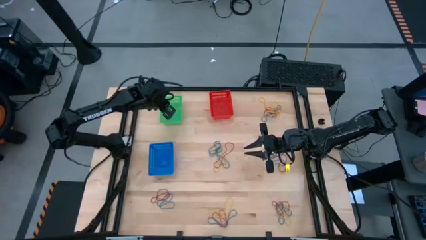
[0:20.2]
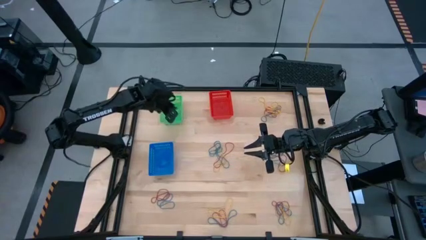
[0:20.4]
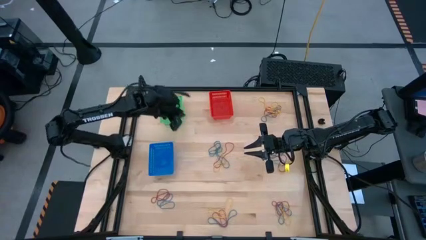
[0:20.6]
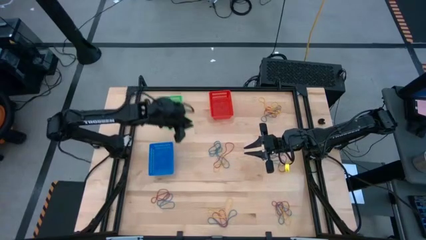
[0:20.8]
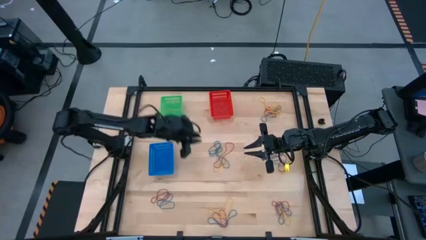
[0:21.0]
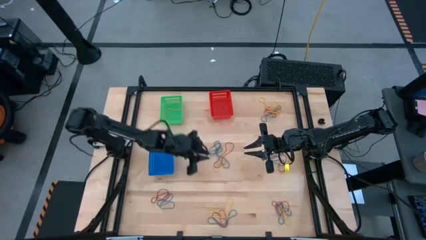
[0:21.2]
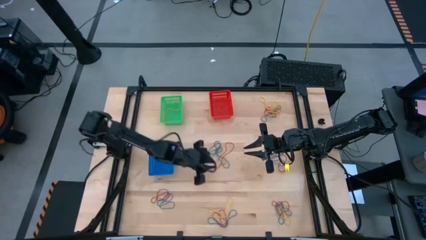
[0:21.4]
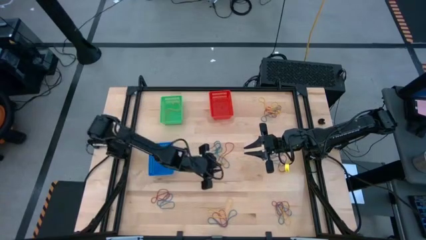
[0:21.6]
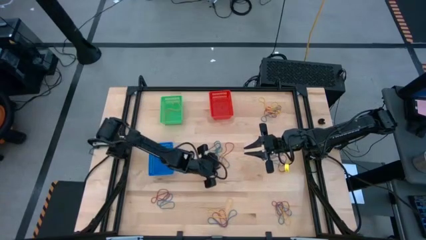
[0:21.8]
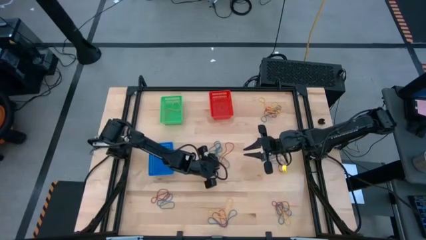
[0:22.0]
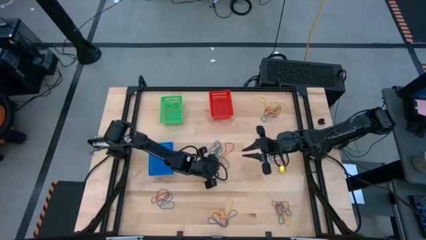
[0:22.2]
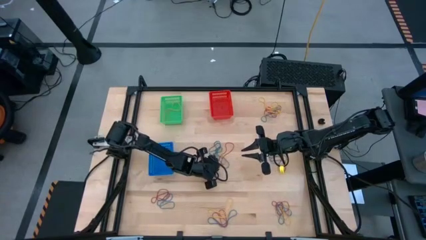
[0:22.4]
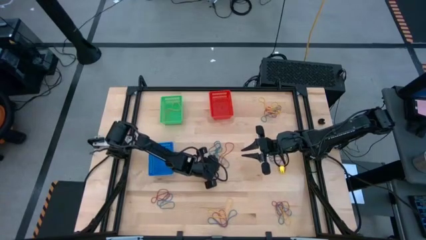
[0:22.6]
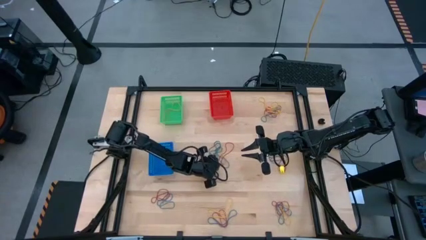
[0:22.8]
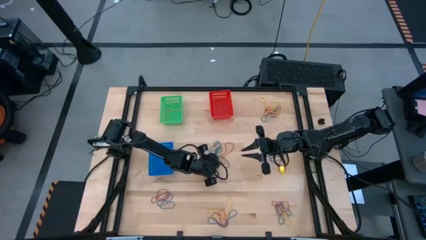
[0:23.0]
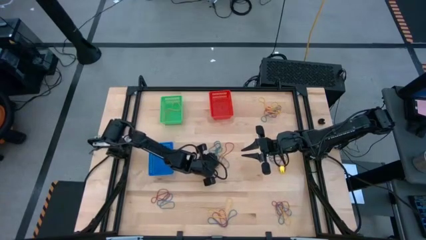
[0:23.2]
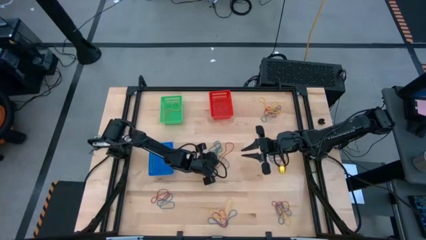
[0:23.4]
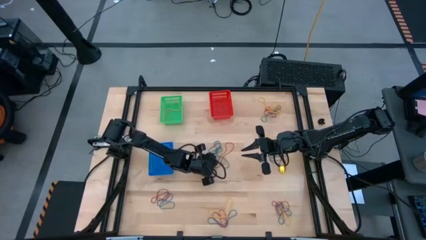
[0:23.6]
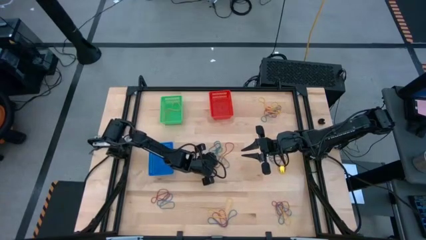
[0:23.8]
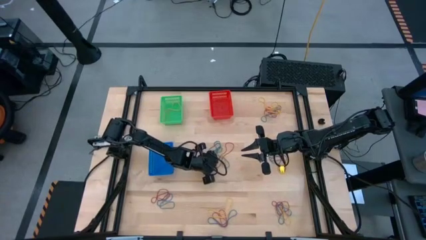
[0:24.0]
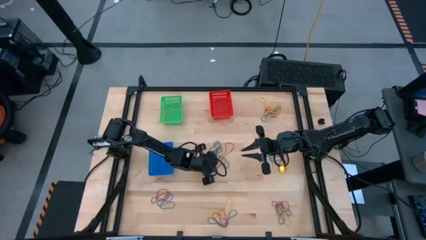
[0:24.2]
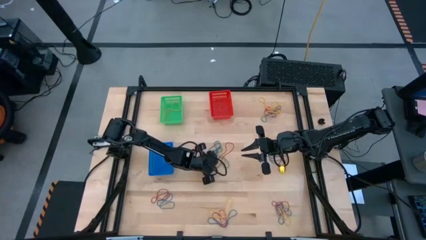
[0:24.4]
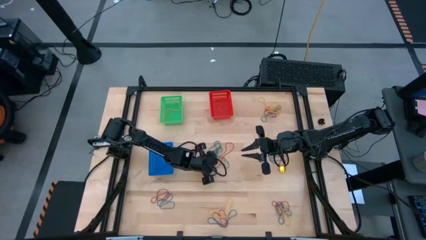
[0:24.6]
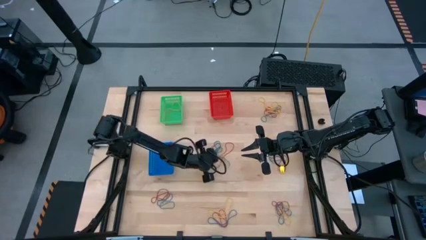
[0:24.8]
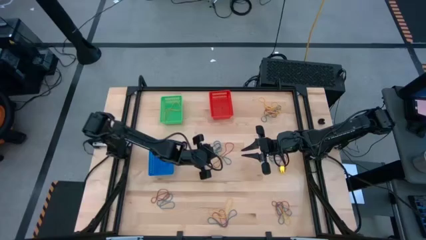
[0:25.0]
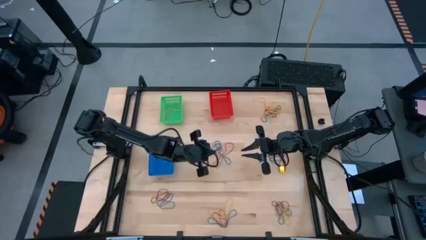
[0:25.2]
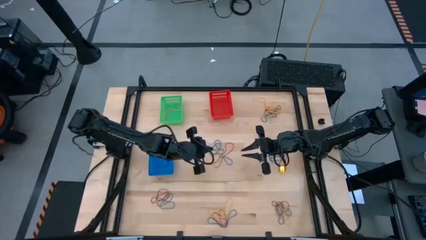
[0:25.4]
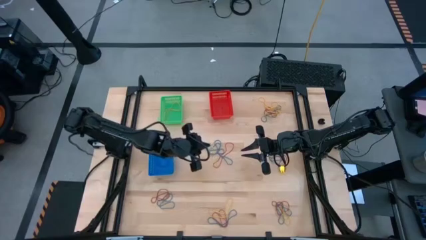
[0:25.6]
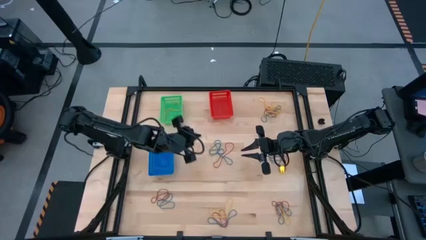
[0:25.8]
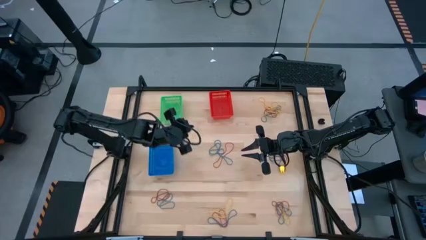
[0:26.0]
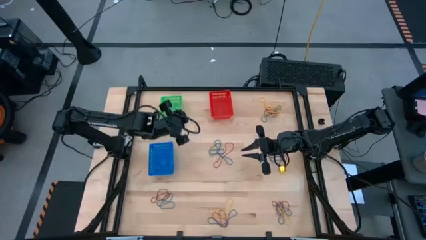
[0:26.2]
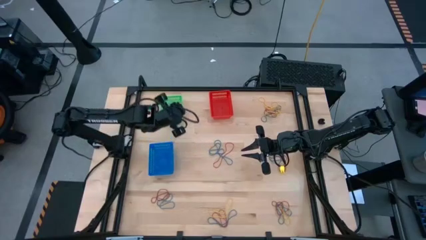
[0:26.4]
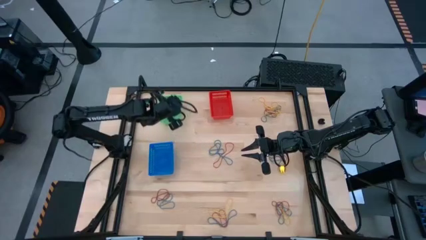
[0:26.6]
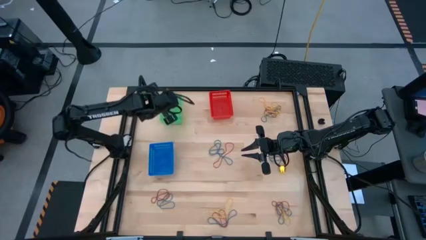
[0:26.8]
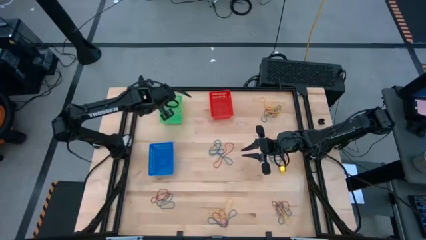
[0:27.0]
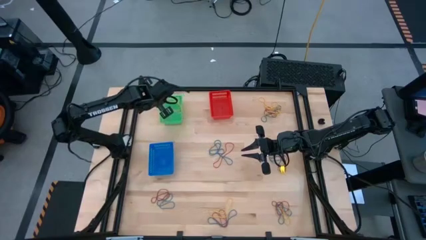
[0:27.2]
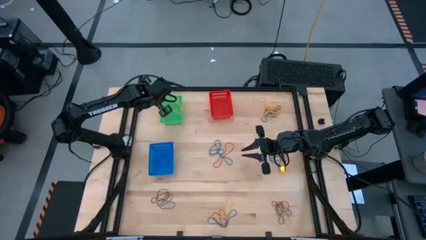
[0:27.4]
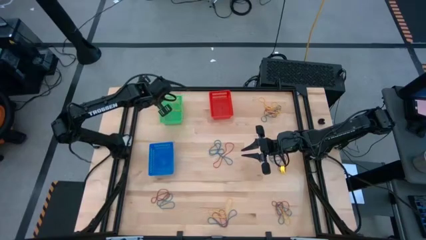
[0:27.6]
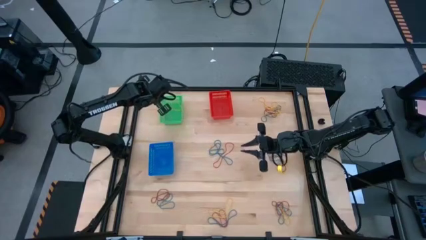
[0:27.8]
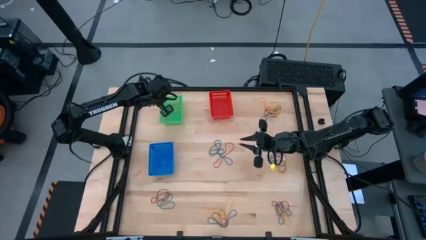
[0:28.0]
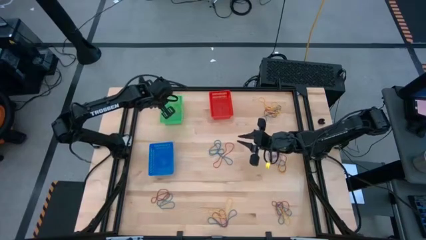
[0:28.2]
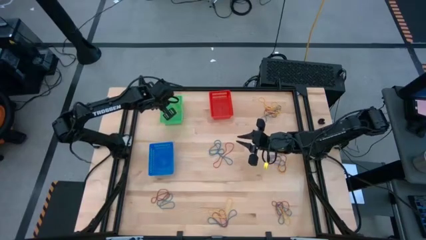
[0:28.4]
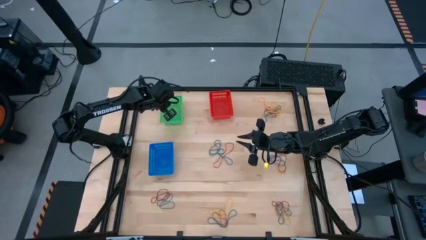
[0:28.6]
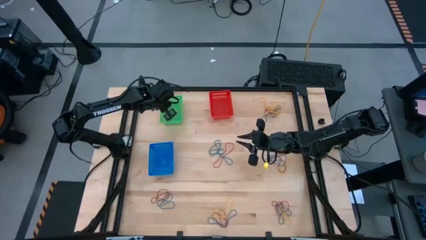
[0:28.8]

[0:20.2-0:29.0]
Task: Sort rubber bands into baskets
Put the yellow rubber band into the green bin

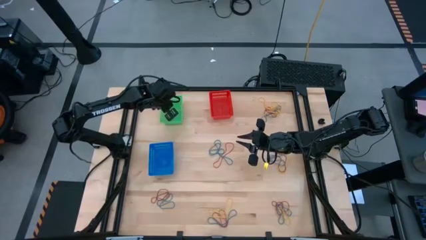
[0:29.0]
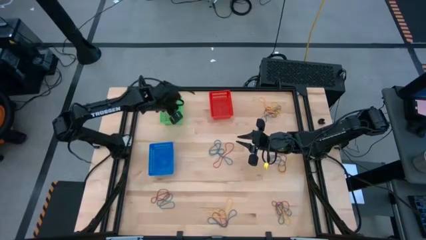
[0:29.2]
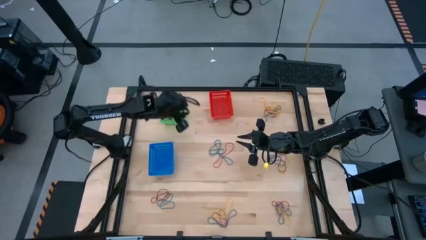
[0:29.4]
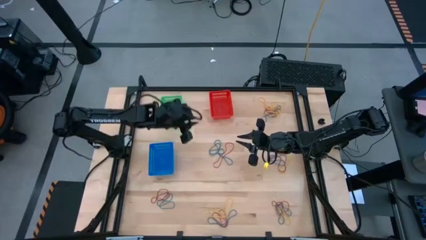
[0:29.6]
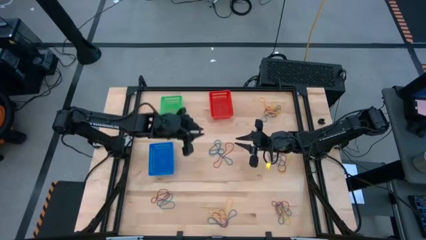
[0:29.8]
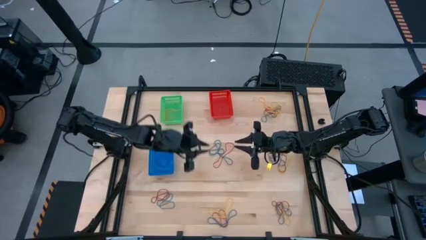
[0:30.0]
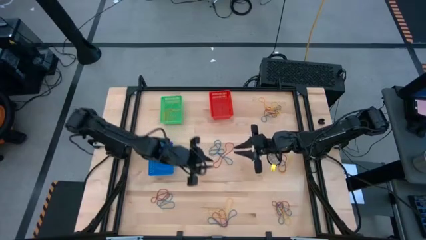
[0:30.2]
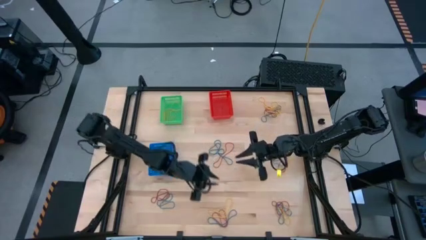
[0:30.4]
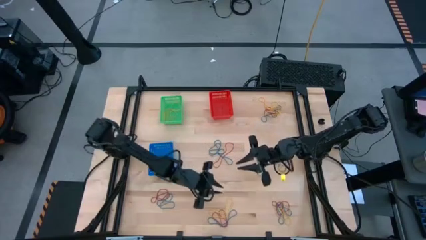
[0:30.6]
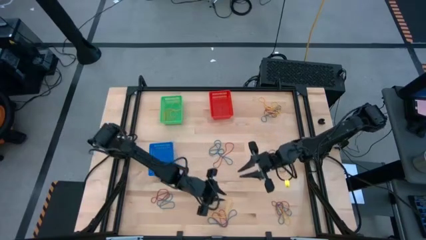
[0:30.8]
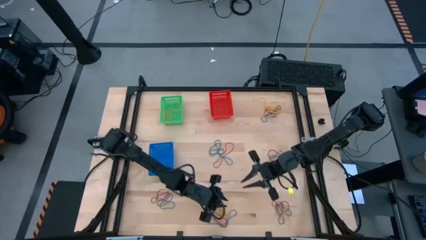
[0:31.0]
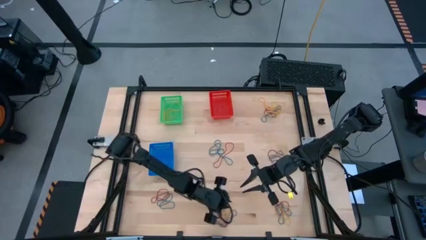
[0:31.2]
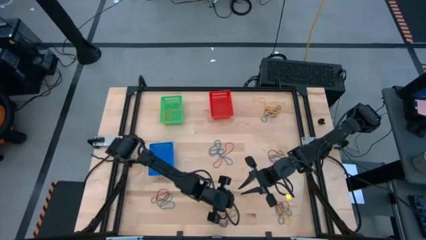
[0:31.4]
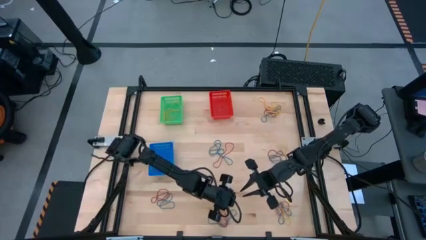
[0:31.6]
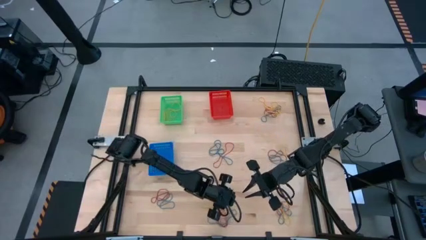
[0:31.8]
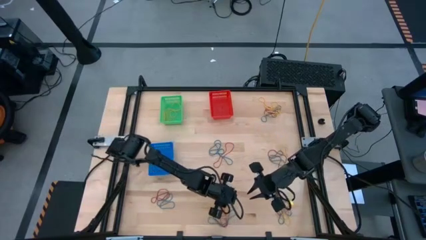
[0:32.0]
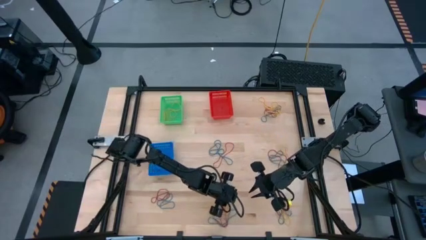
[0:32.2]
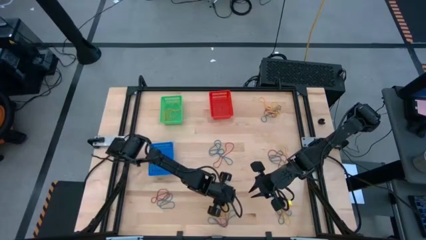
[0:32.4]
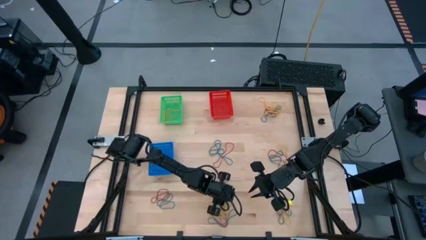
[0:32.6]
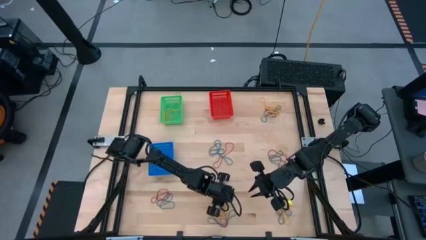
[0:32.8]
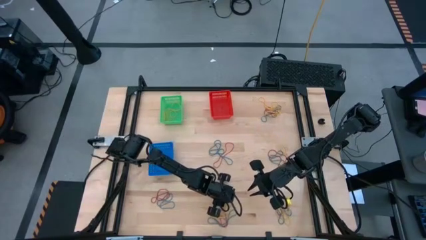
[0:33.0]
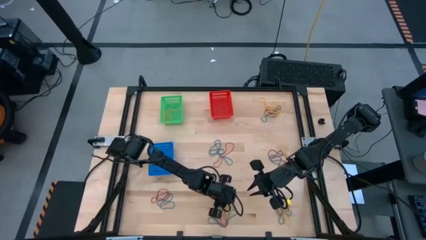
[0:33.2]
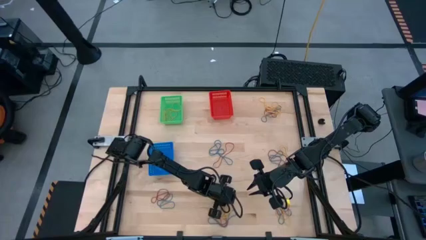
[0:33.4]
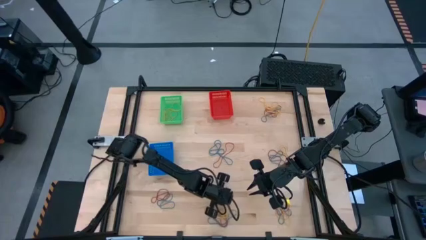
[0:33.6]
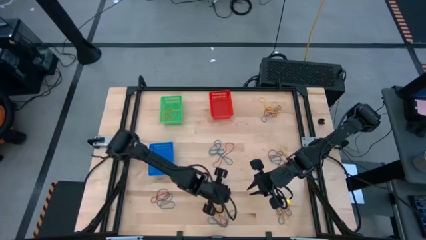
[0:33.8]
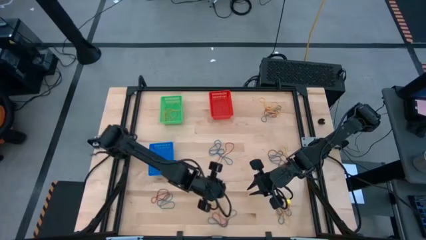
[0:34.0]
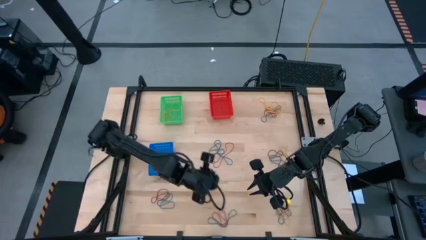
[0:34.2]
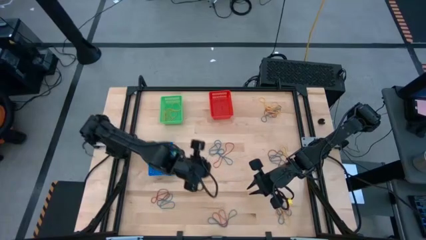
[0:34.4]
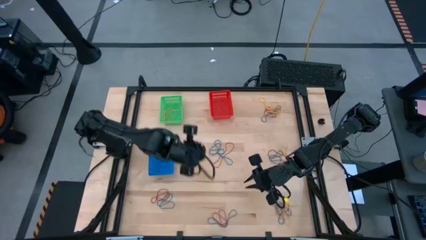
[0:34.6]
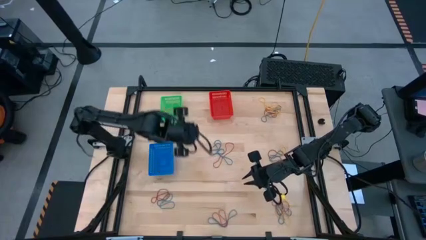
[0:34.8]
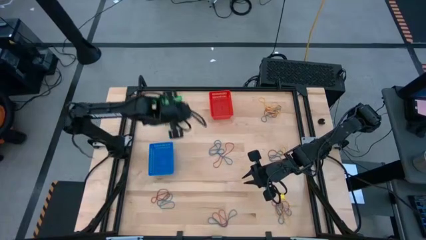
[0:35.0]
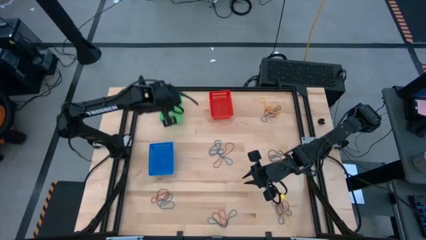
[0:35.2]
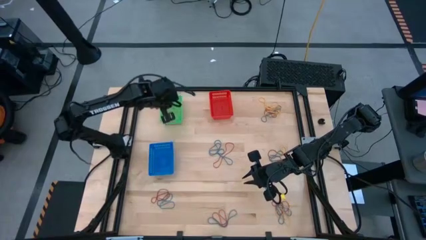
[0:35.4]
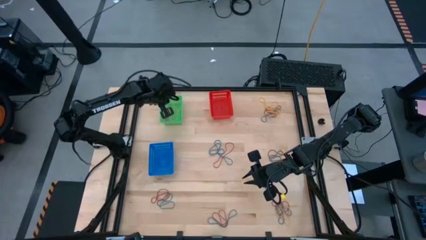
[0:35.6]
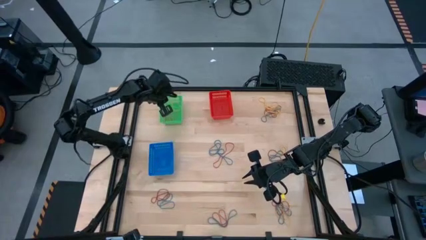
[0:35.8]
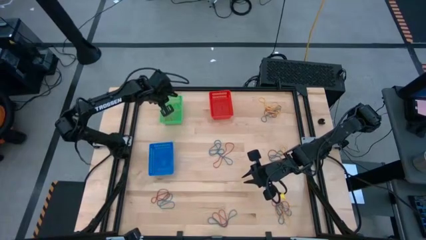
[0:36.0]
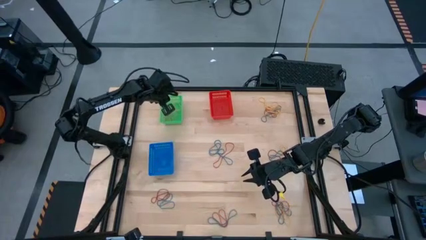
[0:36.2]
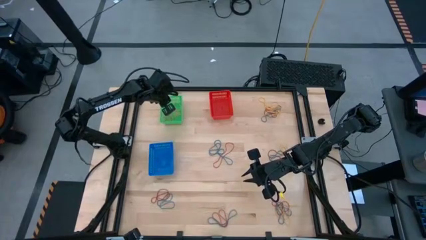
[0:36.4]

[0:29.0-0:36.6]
Put the yellow rubber band into the green bin
